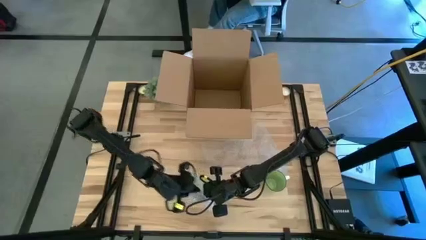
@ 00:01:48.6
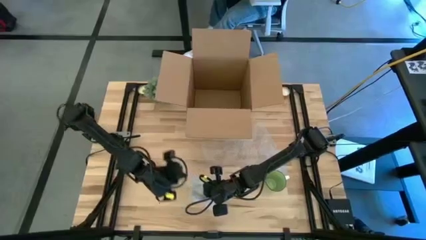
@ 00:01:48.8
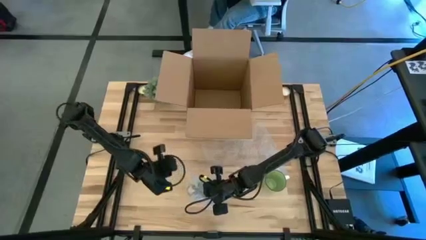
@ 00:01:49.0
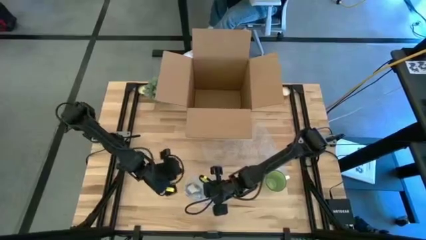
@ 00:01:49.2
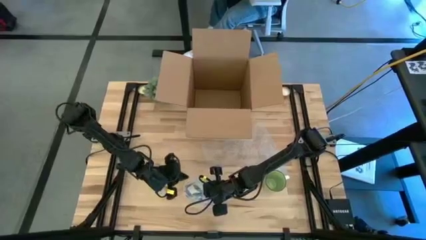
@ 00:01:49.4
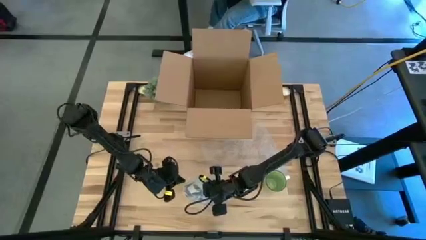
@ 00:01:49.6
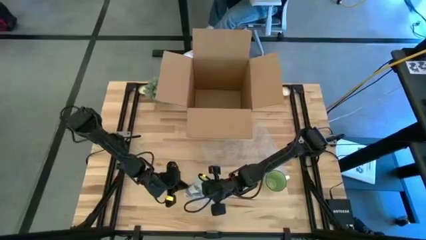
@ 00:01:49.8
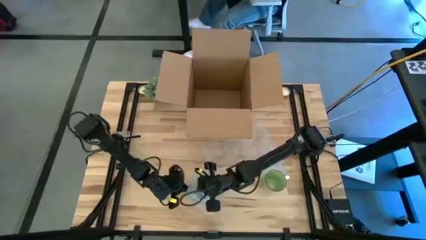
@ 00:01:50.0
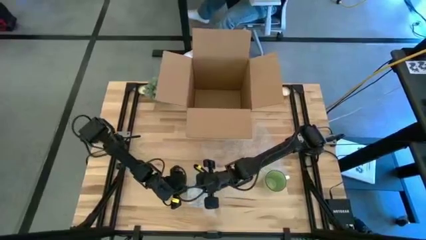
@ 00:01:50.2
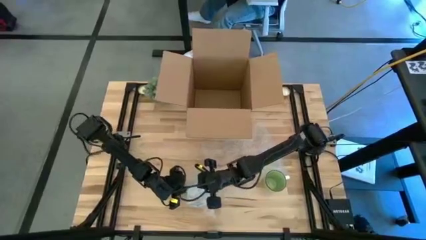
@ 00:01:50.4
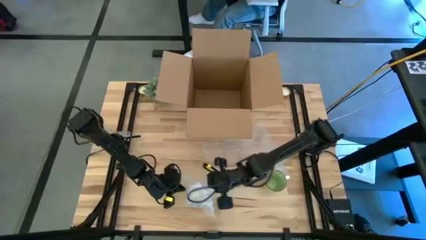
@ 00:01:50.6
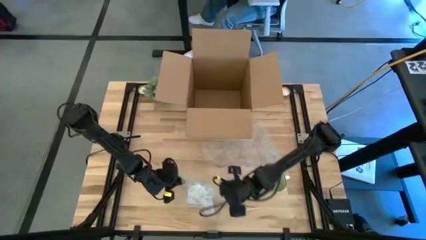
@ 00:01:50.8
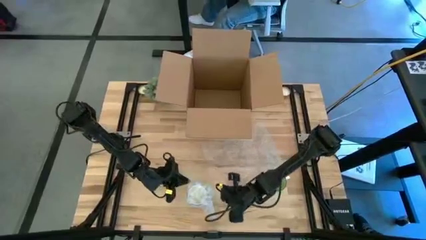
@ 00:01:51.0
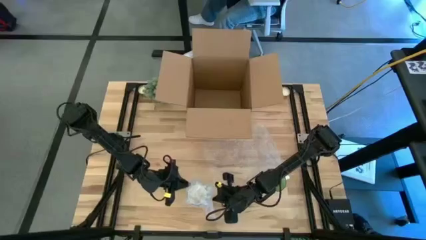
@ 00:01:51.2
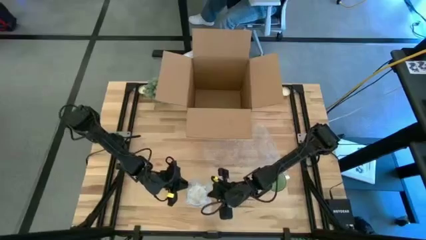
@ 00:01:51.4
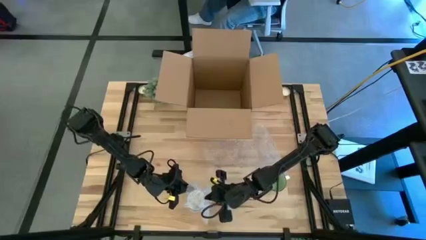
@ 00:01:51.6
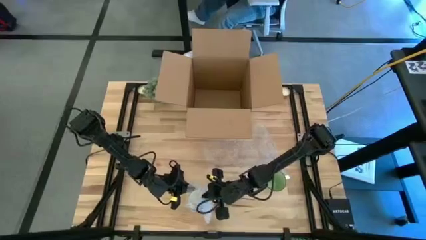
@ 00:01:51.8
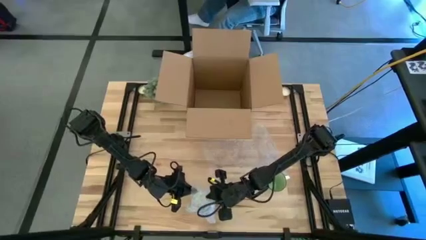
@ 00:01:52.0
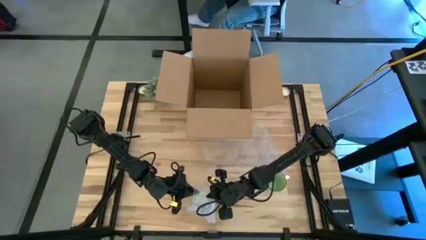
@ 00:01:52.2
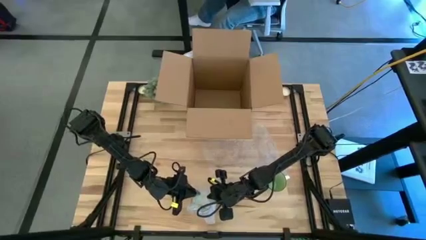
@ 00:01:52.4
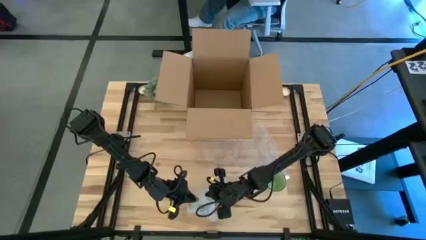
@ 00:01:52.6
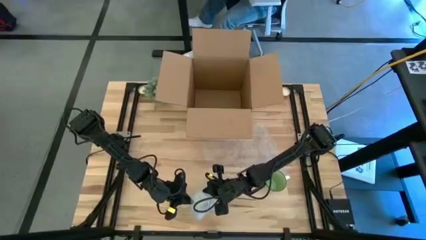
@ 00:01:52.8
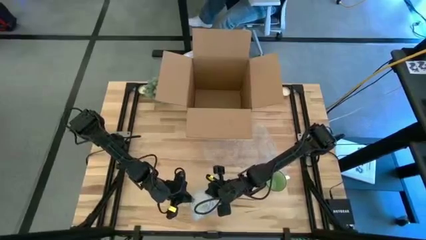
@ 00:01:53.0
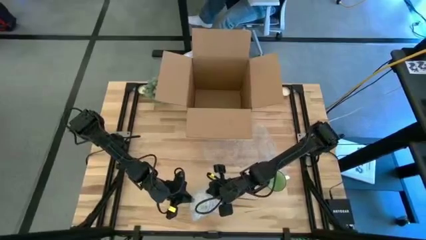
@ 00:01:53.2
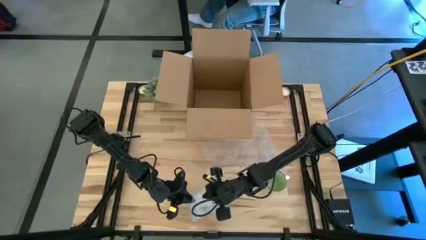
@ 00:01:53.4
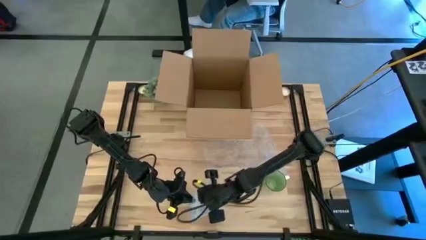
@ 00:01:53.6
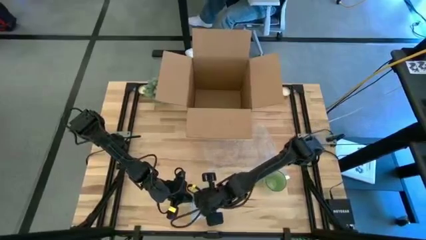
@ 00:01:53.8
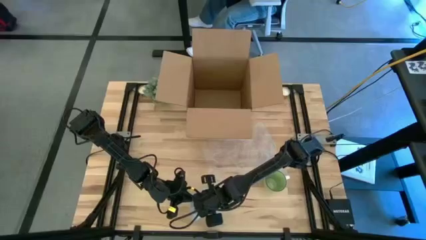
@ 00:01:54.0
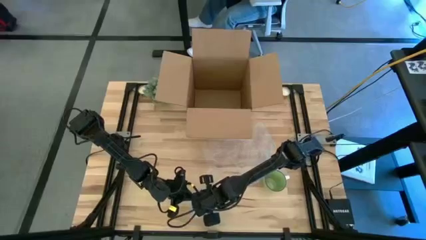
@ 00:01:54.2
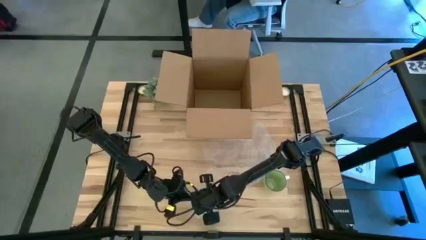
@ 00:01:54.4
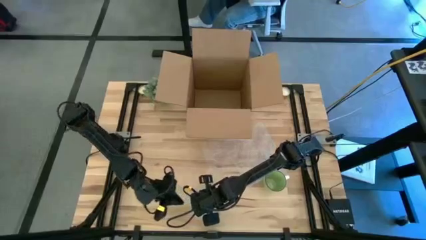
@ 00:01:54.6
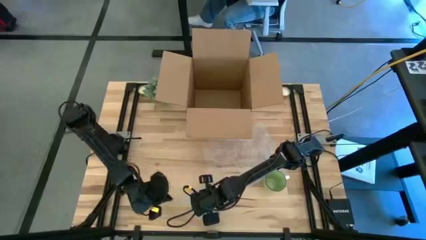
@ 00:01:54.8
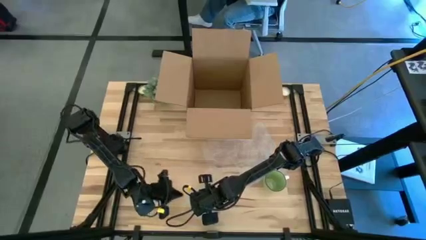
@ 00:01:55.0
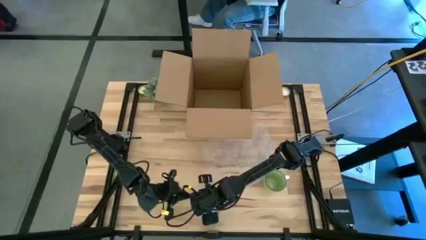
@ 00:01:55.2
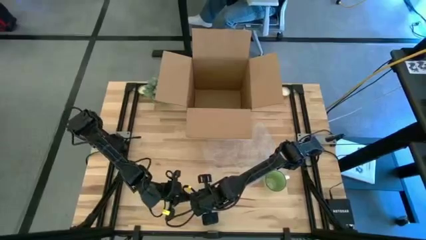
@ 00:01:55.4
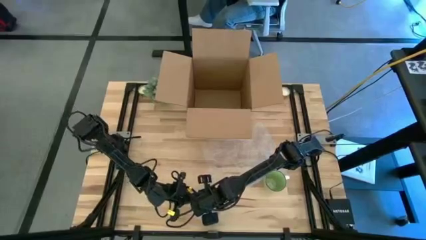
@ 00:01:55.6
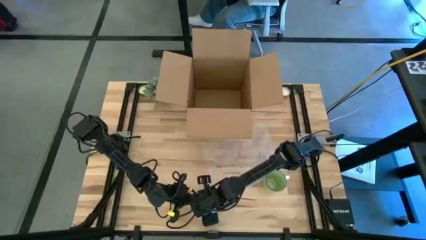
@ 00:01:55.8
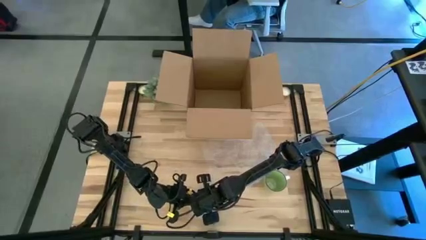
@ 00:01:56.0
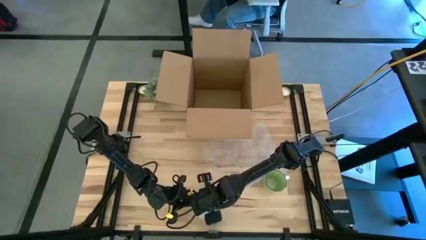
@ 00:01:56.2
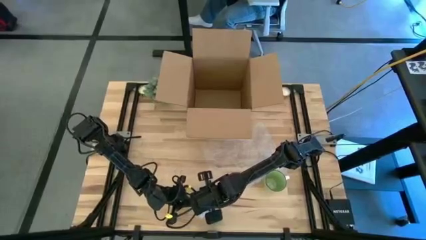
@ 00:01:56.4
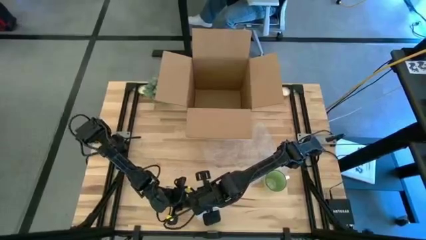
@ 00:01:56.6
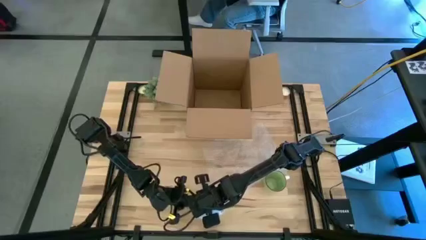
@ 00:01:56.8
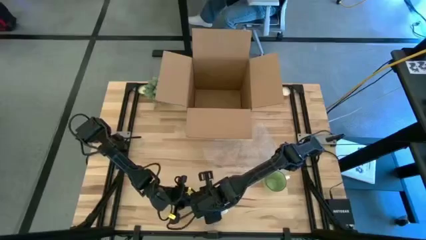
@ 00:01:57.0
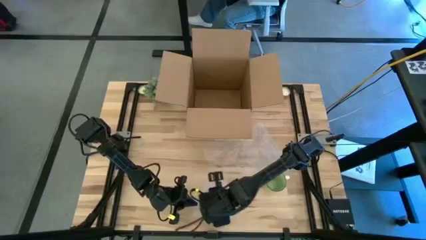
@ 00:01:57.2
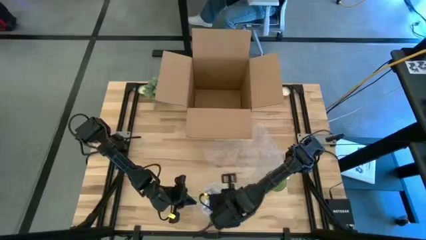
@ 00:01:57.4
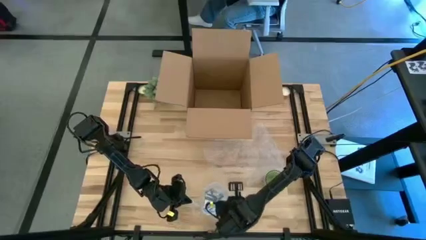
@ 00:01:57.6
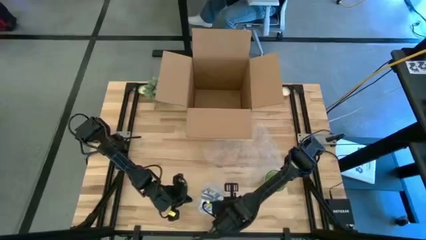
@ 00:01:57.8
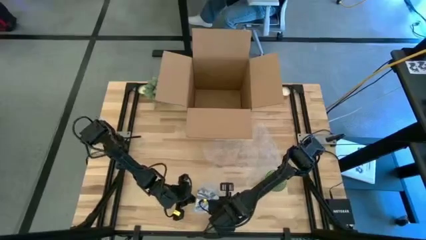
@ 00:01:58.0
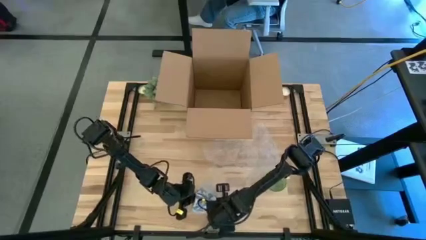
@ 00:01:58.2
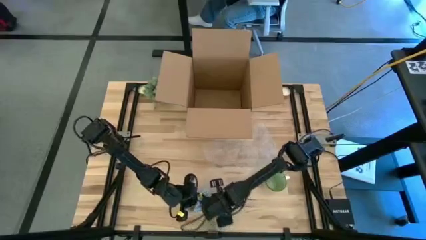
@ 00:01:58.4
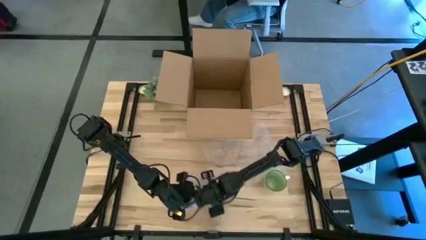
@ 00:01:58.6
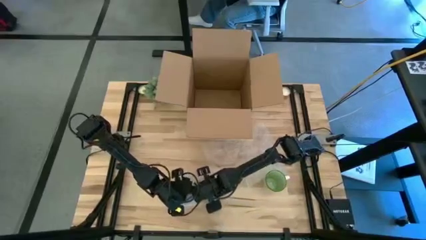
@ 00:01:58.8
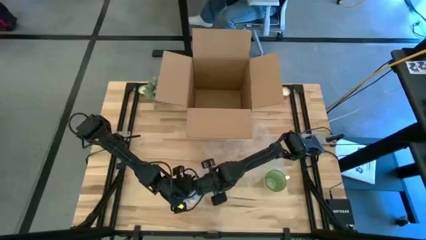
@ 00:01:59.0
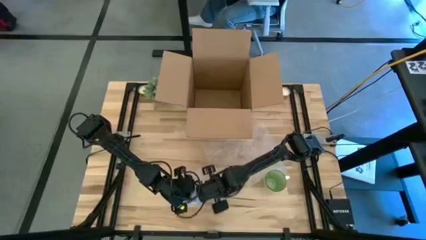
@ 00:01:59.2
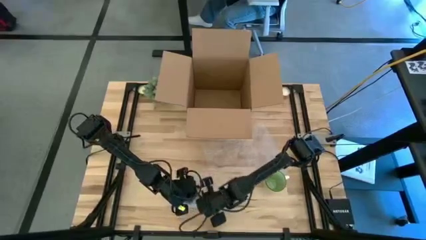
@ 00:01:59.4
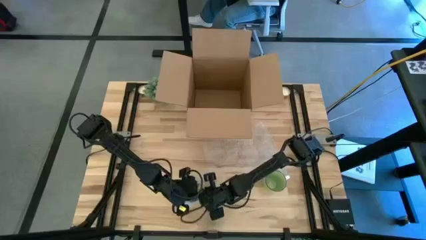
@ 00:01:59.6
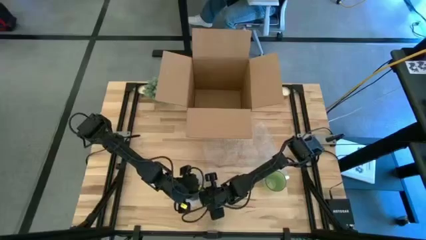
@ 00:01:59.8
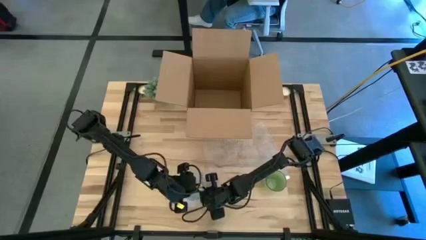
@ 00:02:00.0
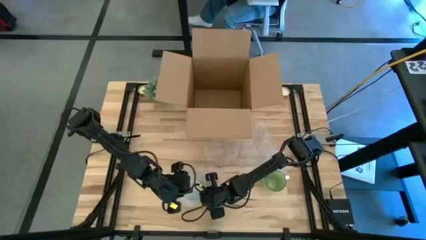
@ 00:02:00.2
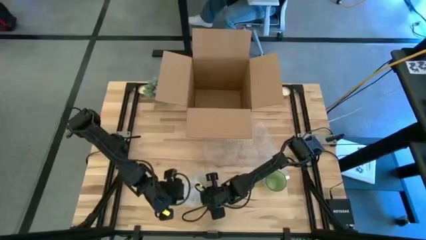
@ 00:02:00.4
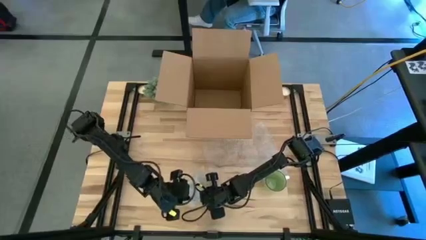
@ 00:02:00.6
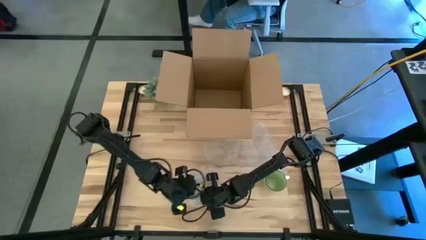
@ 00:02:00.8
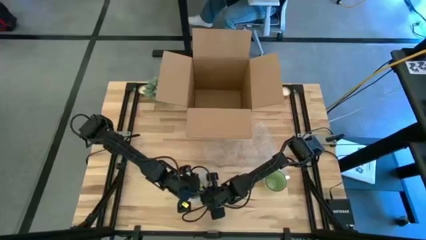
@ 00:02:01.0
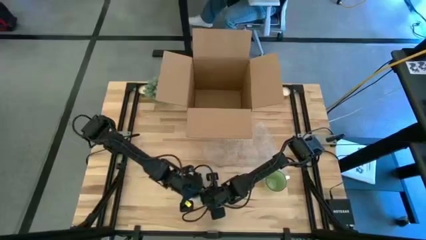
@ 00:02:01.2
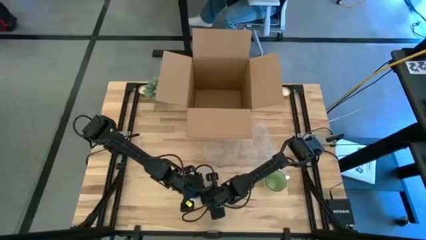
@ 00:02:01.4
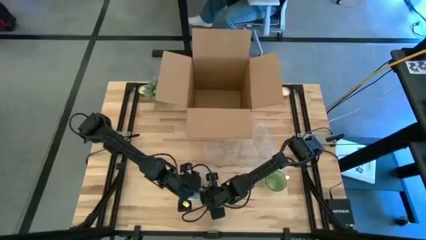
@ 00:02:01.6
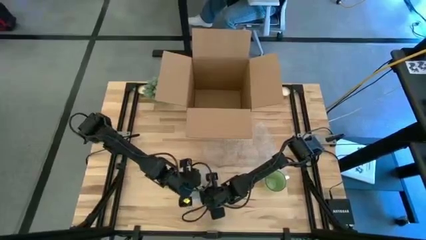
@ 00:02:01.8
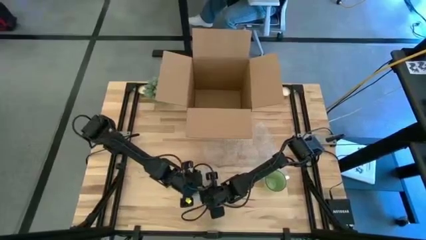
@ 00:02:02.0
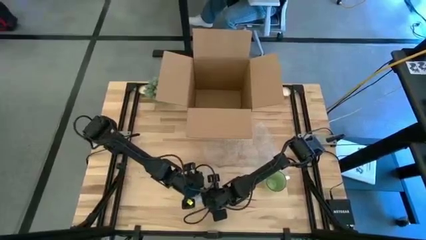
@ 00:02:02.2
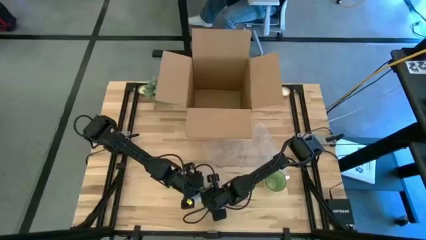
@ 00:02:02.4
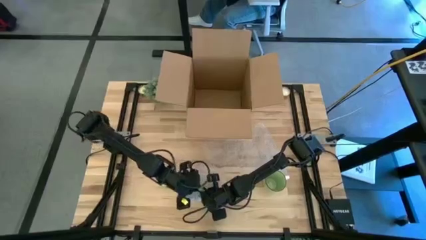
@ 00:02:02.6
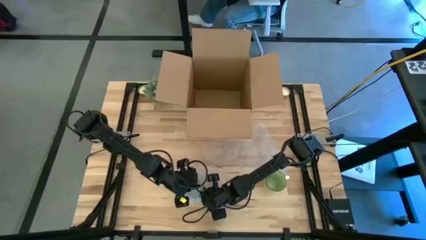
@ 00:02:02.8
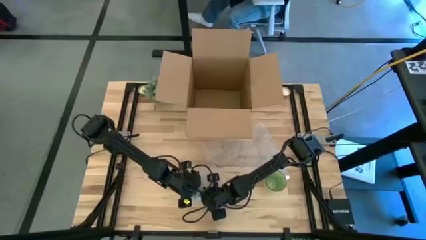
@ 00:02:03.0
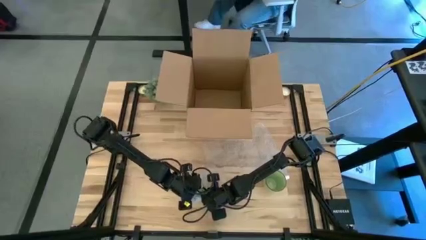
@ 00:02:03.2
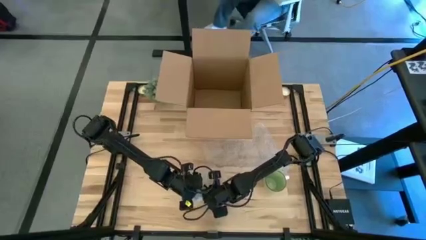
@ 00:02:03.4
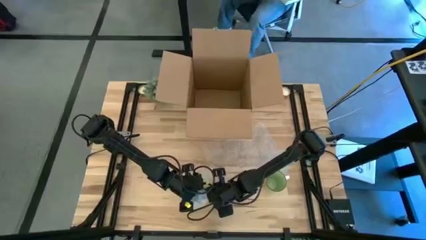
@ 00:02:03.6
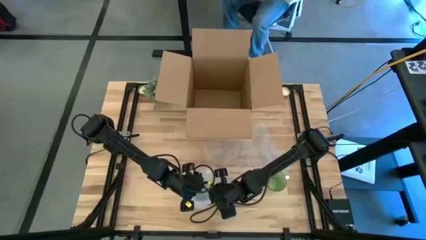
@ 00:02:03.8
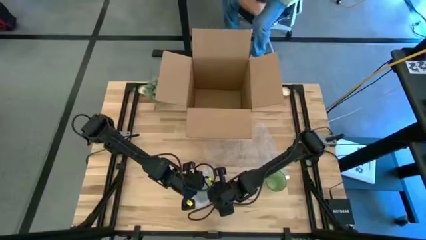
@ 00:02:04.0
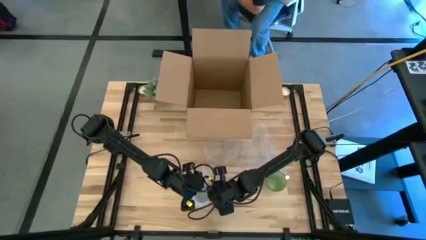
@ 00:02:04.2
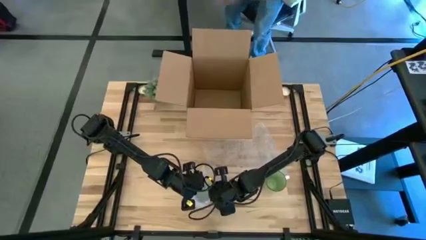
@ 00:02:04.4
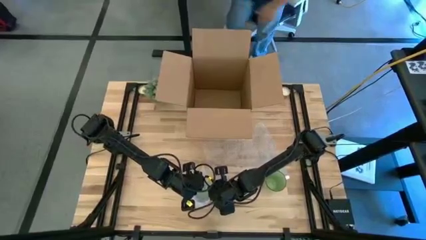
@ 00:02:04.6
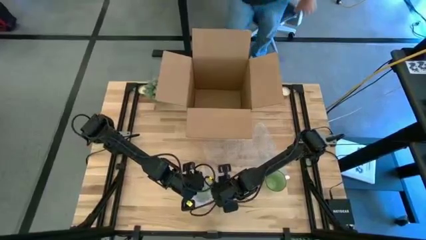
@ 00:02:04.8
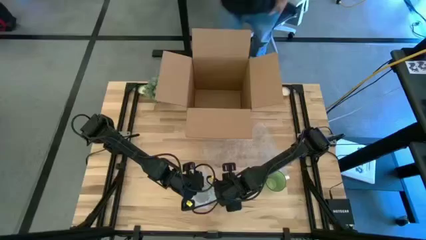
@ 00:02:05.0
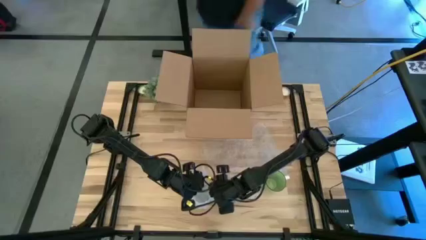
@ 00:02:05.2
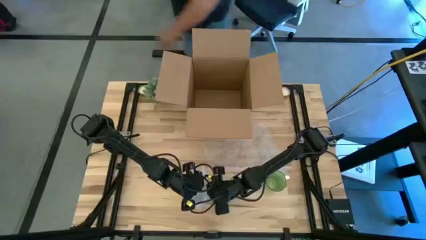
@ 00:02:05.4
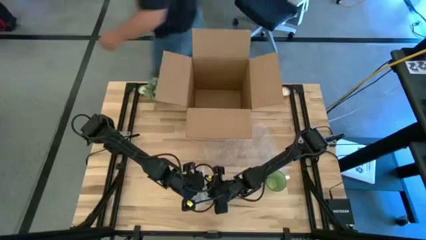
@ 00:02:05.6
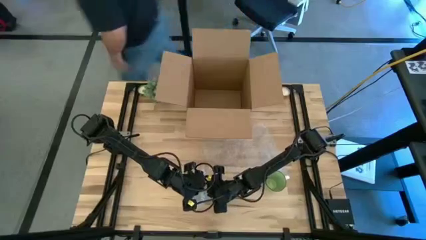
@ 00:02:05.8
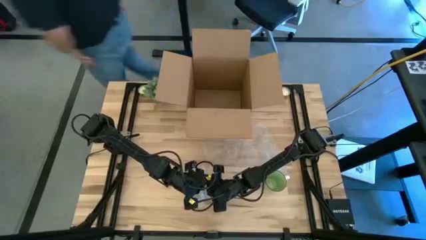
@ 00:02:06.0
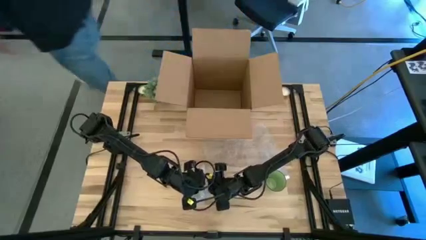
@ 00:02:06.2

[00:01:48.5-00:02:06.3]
Task: wrap mug
Wrap the white mug with bubble wrap
